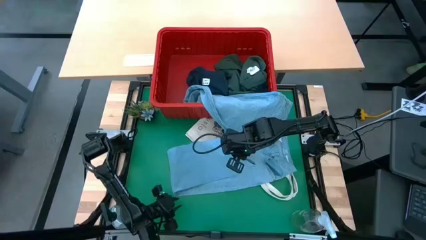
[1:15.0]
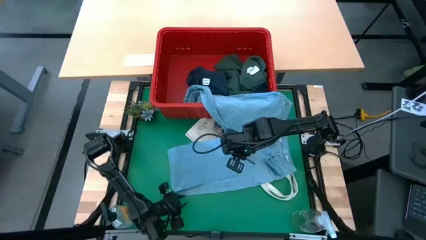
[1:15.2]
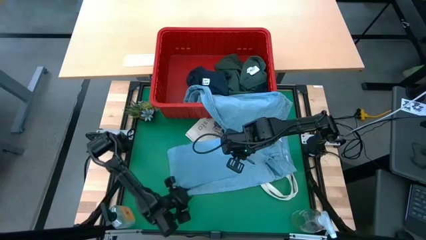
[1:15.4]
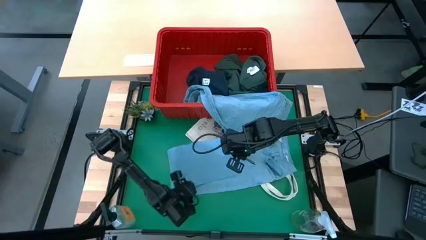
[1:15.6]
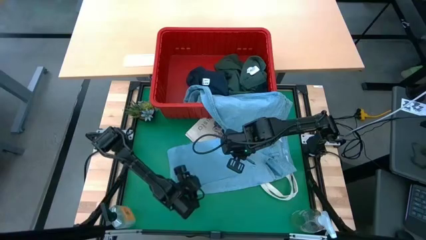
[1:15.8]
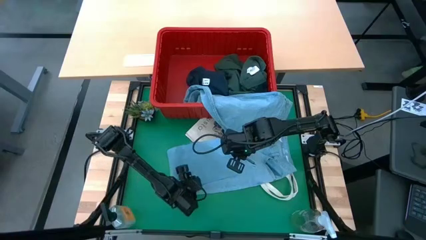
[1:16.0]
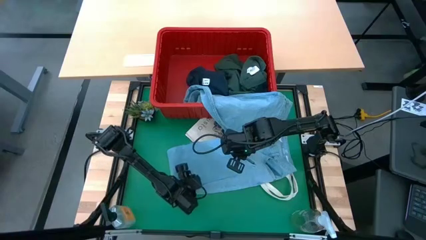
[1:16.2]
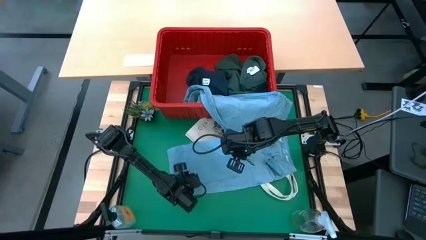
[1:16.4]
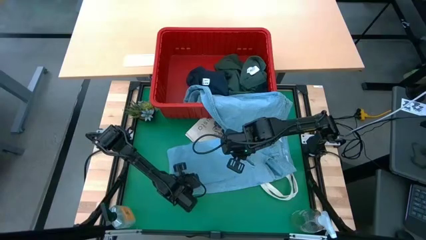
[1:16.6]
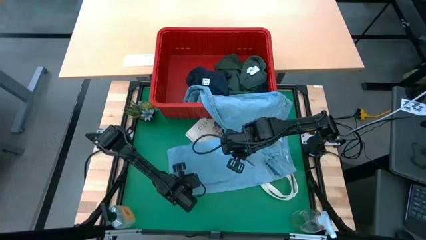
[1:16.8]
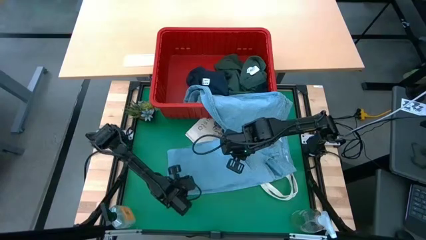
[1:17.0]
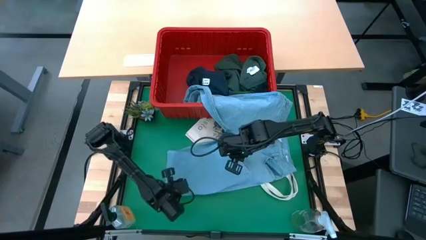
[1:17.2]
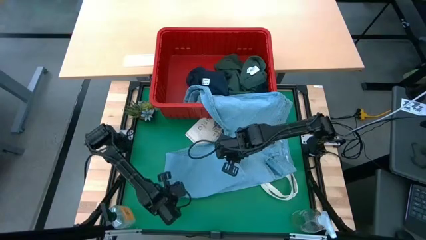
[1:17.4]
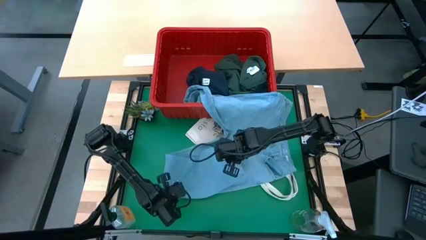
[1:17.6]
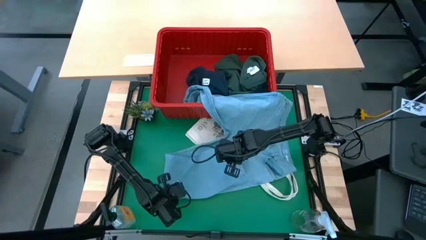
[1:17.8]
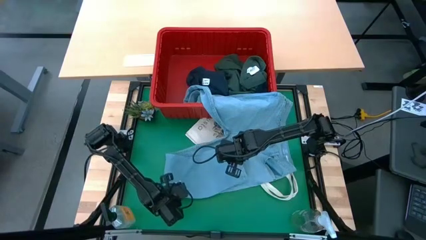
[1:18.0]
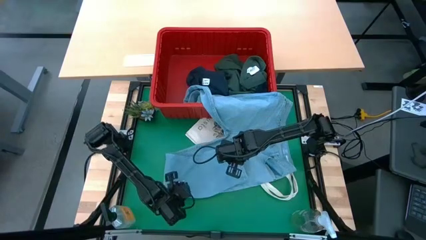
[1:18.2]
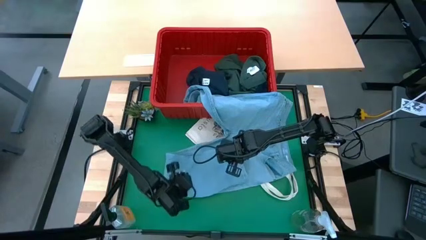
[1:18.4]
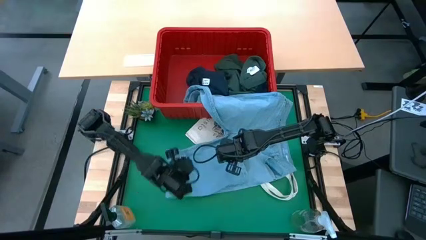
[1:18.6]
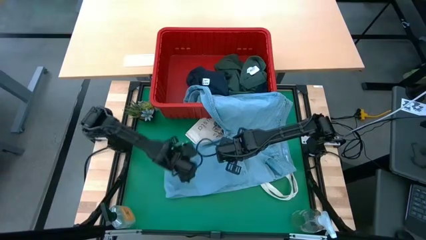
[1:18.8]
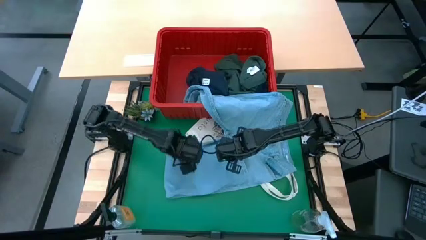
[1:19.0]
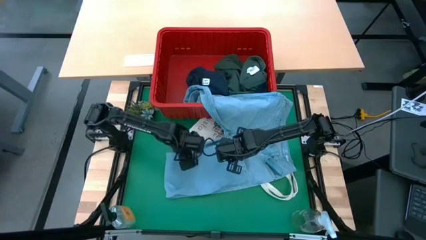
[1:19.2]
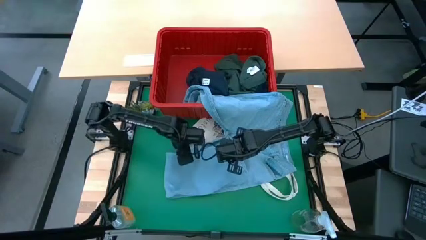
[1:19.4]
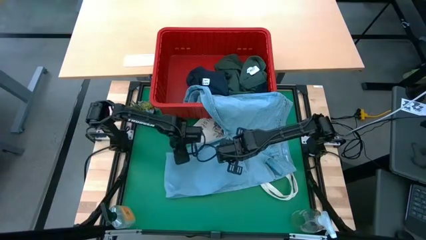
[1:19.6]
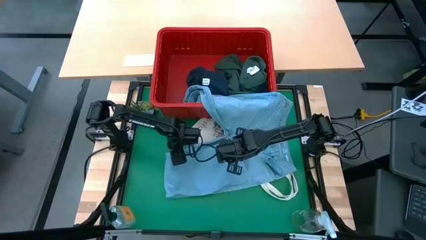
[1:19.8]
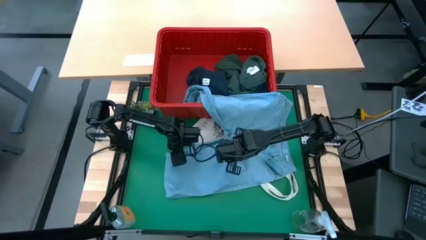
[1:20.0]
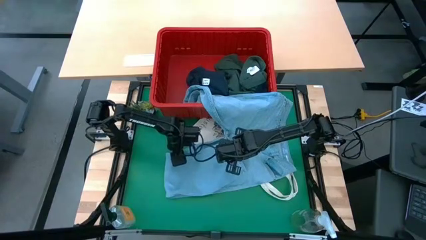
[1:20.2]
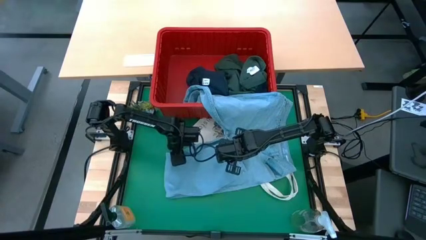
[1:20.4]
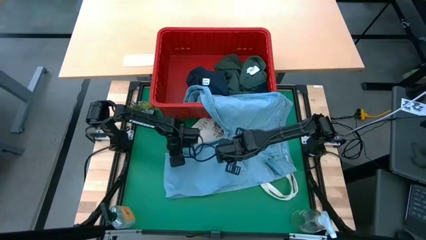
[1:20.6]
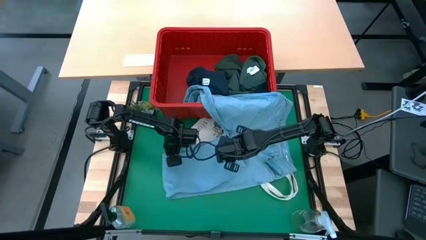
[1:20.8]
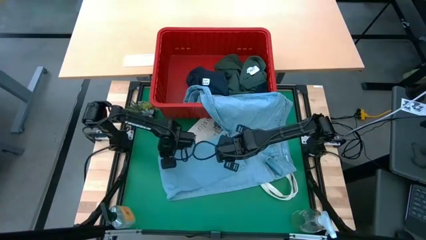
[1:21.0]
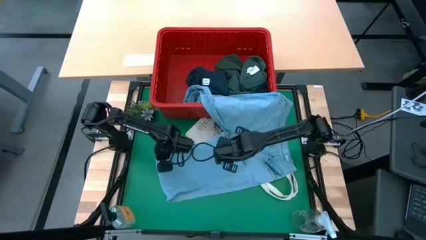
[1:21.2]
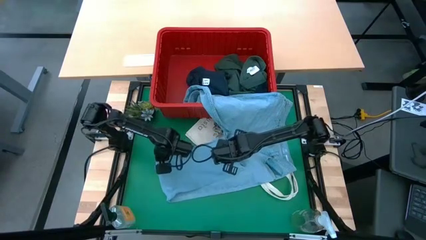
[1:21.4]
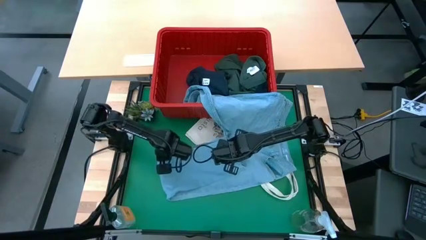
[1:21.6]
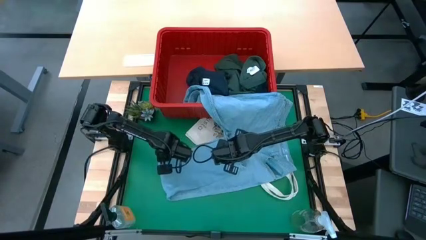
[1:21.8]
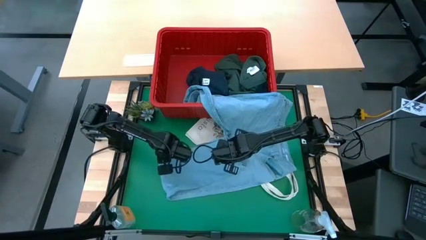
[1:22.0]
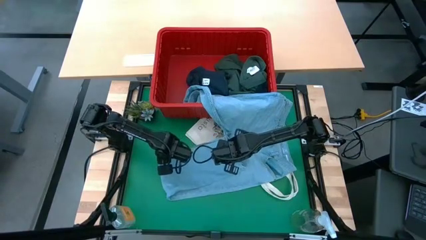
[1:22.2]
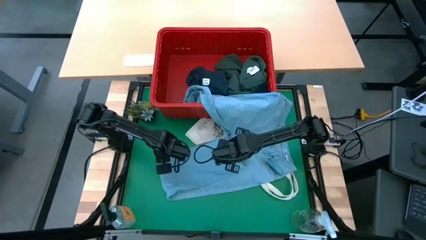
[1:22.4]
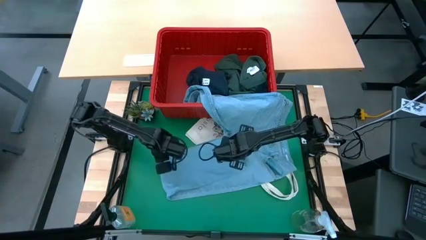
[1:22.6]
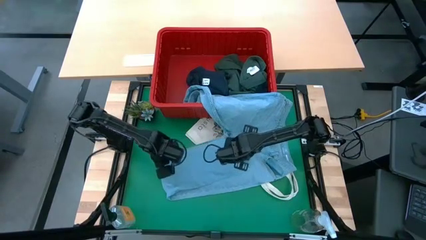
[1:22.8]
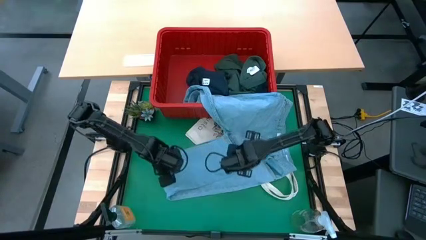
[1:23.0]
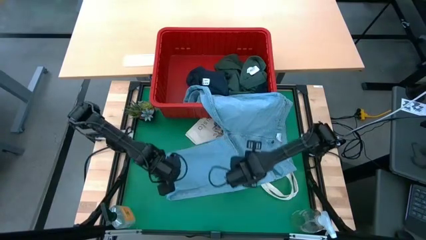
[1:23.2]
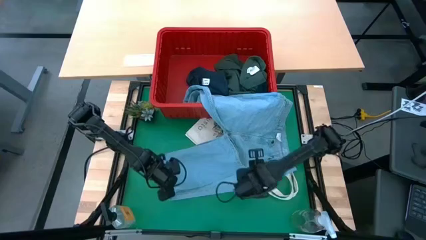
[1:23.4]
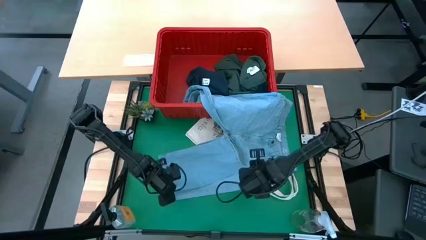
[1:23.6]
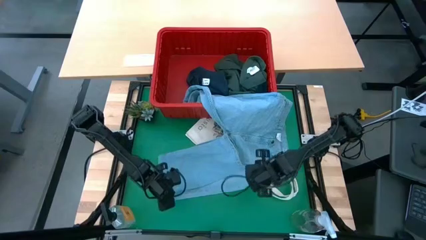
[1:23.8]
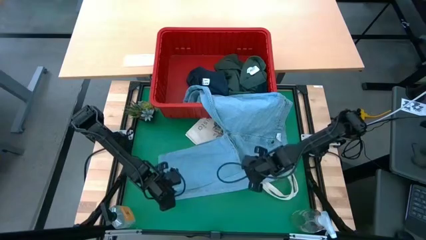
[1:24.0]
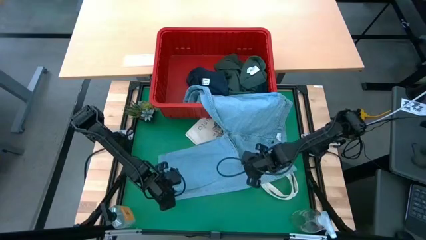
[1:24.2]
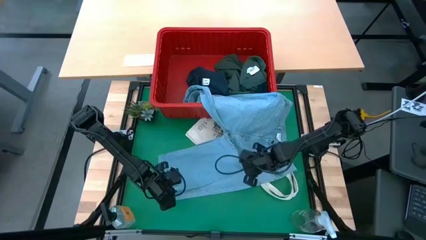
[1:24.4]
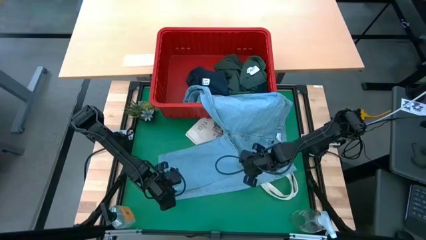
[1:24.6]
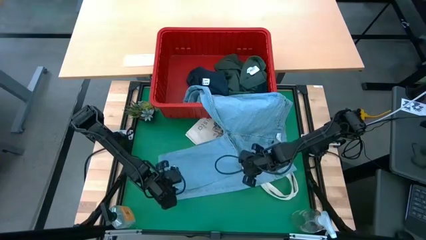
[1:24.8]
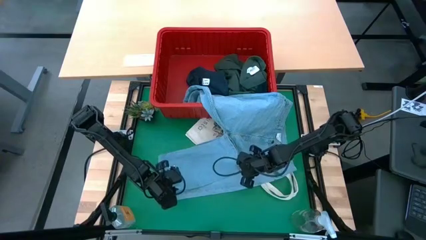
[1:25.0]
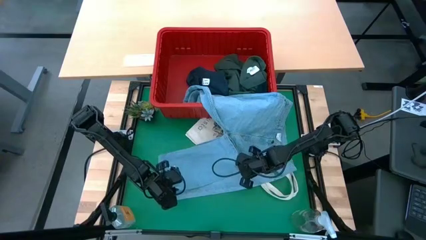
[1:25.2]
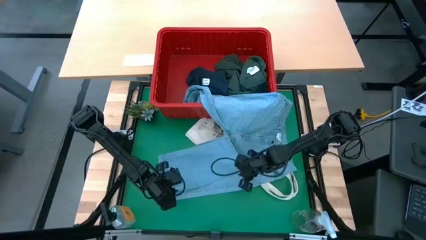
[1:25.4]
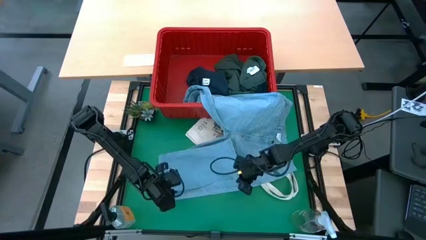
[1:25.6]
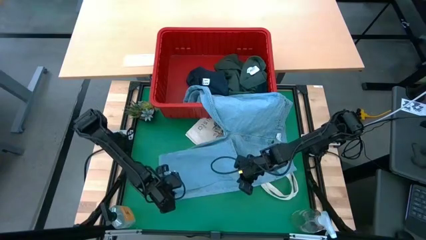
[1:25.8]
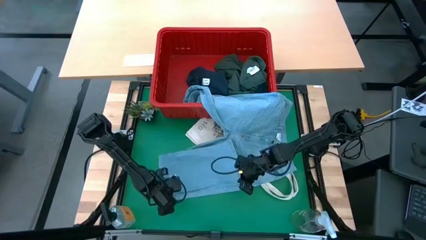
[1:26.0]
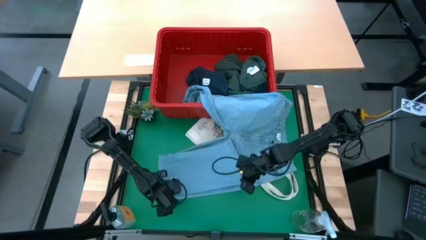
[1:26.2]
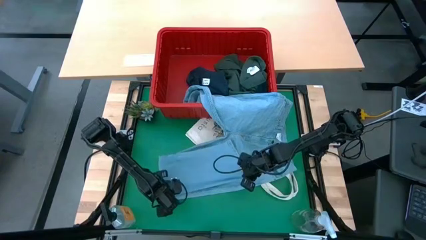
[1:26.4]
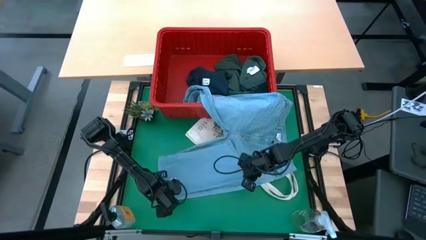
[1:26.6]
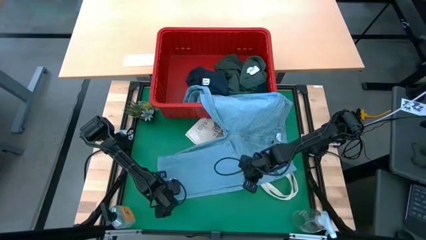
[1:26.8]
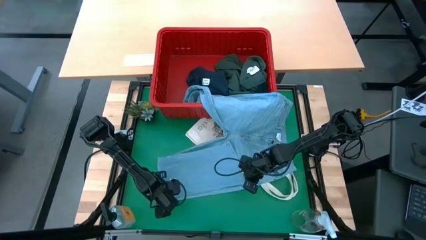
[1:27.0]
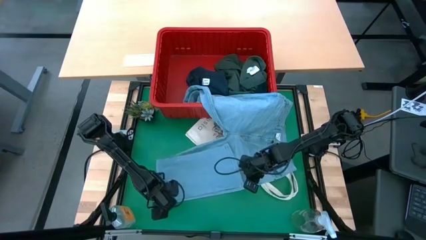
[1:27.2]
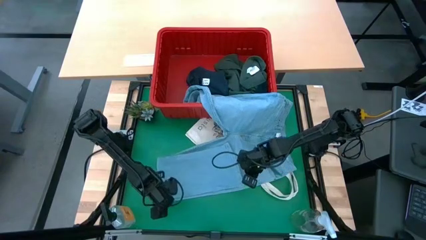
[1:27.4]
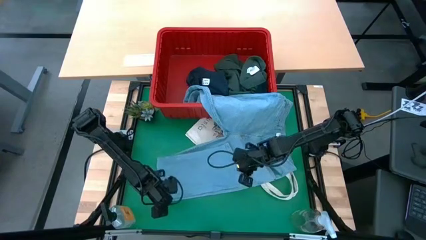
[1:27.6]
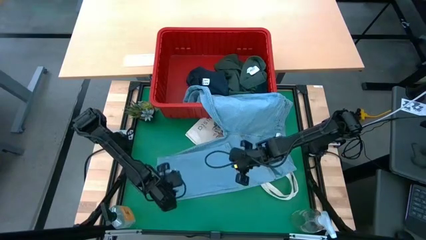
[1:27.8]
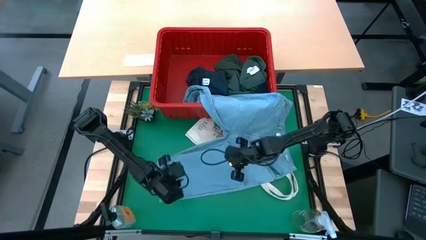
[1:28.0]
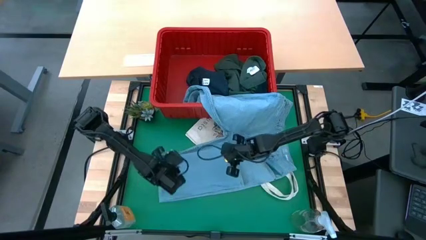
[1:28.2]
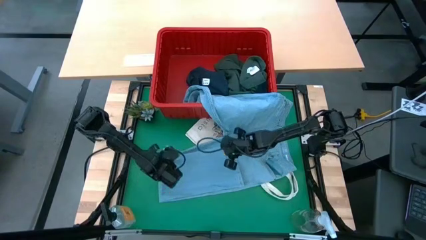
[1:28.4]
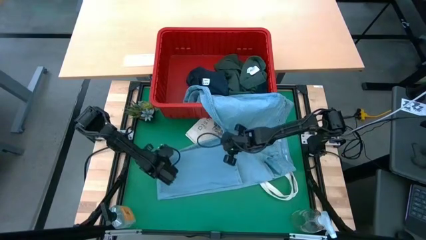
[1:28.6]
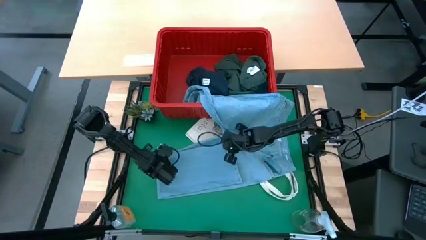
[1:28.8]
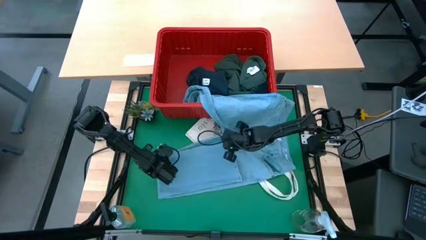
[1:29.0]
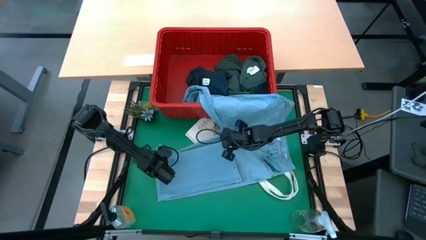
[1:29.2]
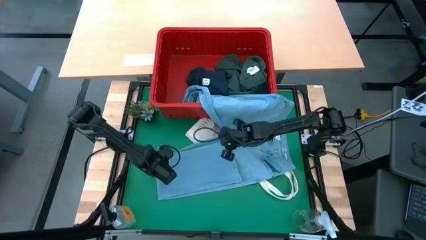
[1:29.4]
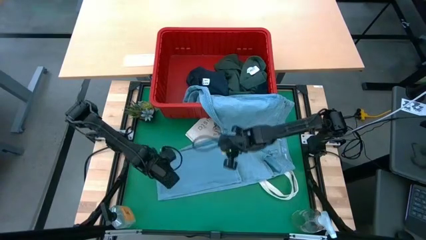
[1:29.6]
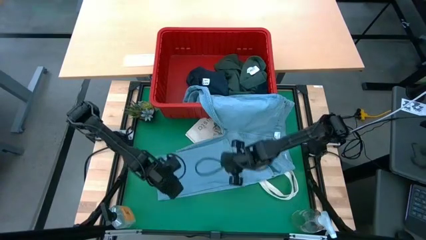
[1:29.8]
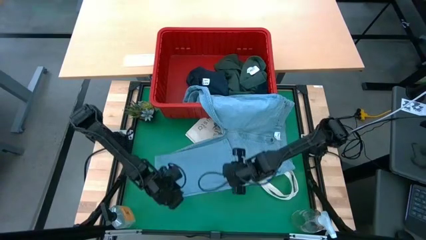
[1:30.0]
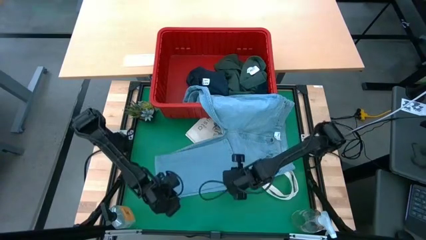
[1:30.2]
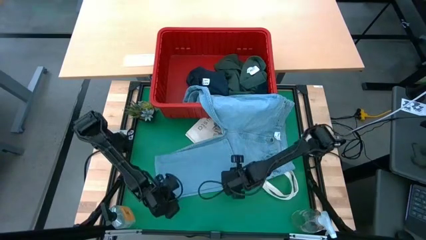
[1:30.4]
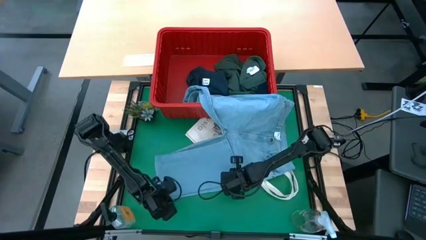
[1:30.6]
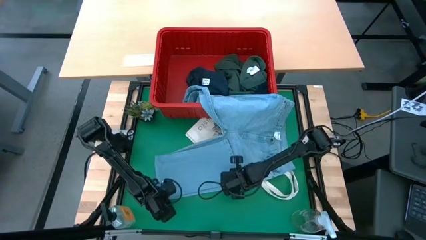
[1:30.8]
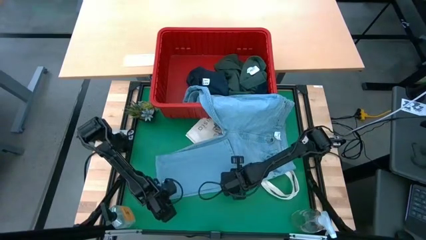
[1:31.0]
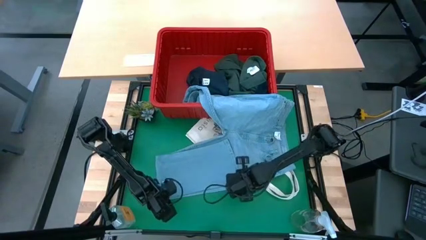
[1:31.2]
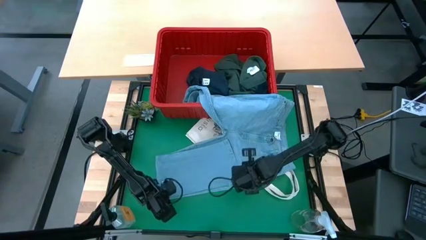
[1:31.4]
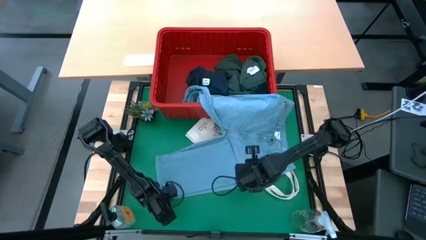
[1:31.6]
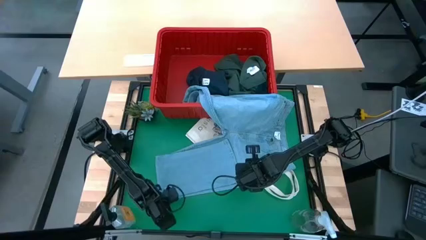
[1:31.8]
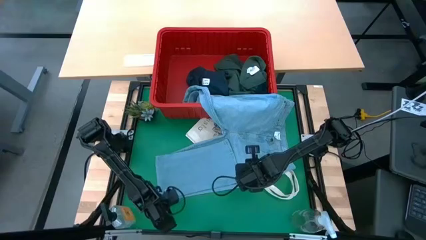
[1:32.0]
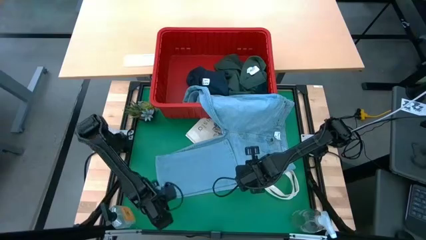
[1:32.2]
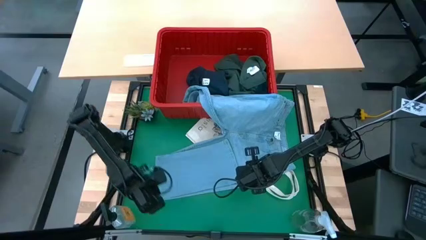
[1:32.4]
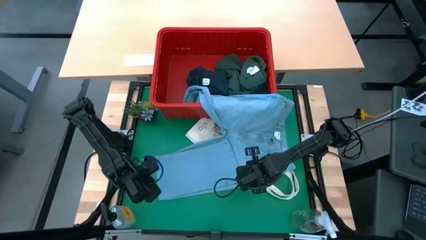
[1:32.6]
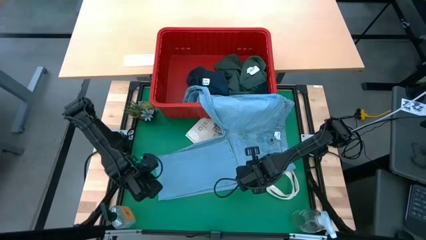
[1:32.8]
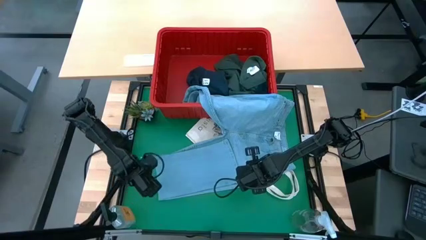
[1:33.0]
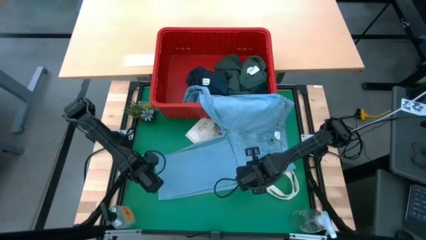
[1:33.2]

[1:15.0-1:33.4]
Task: Fold laundry
Fold the light blue pants
